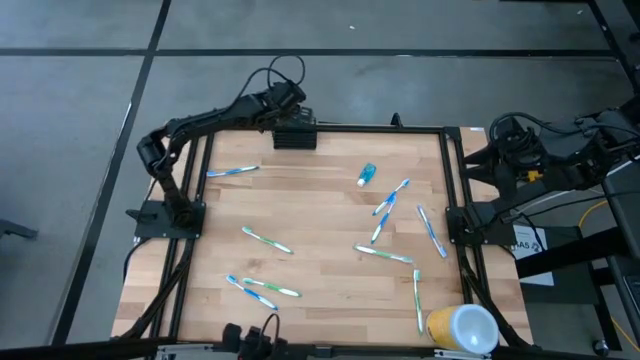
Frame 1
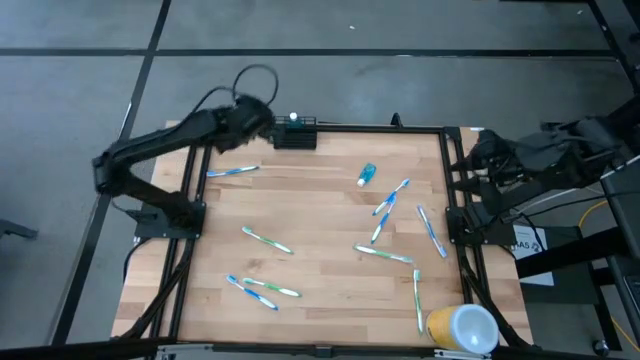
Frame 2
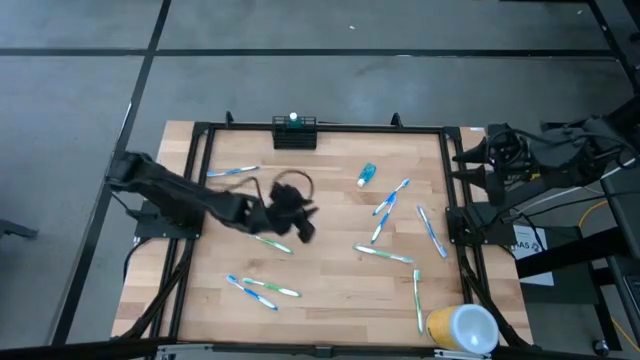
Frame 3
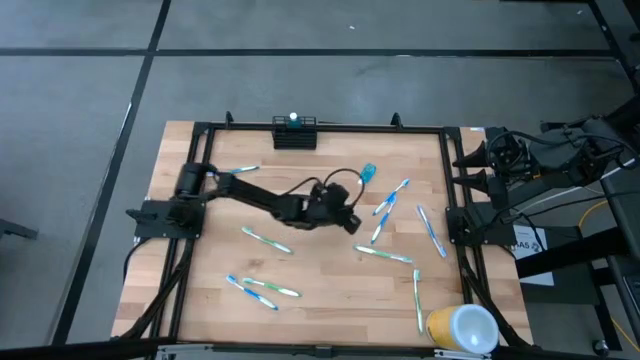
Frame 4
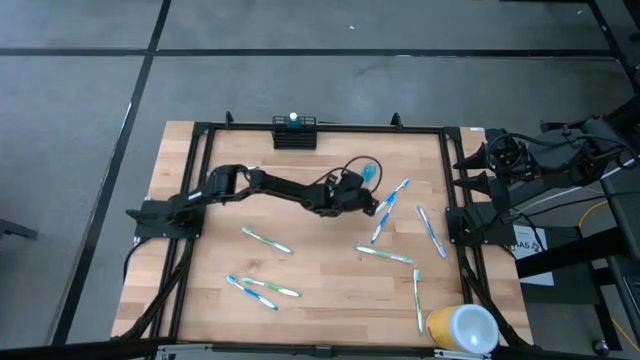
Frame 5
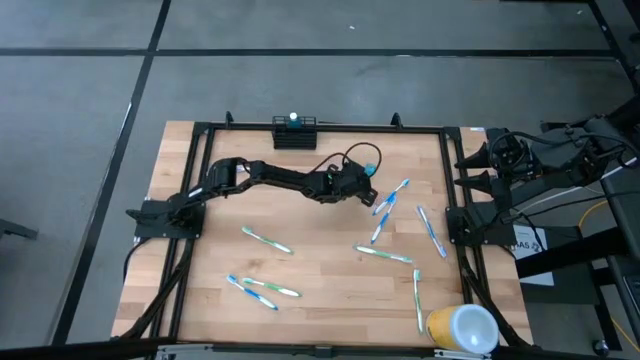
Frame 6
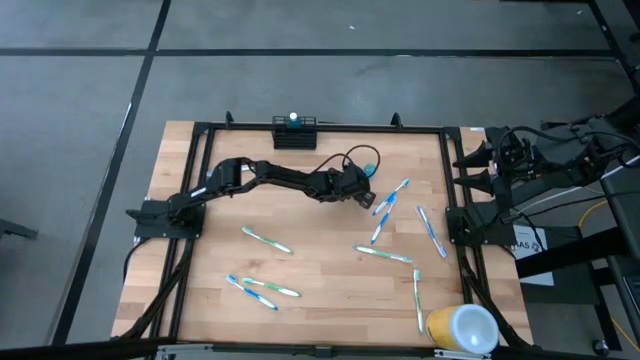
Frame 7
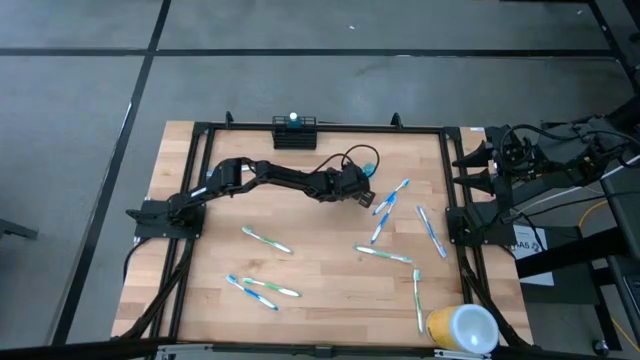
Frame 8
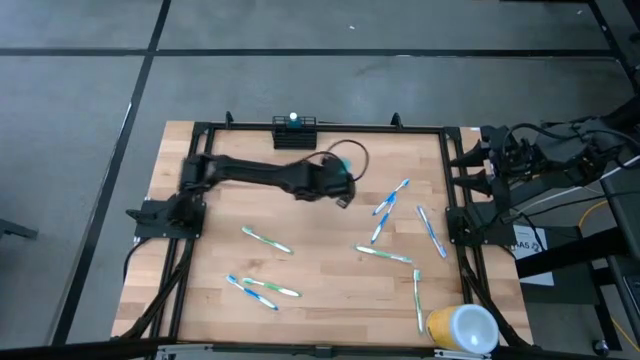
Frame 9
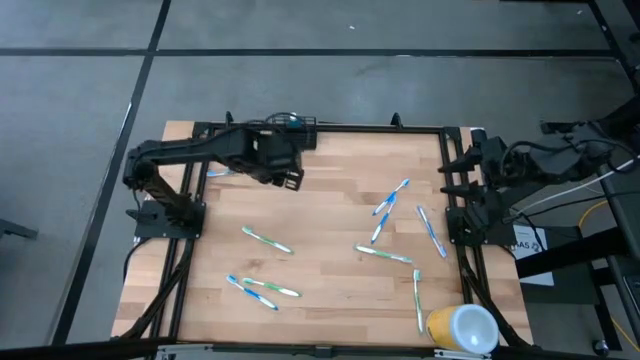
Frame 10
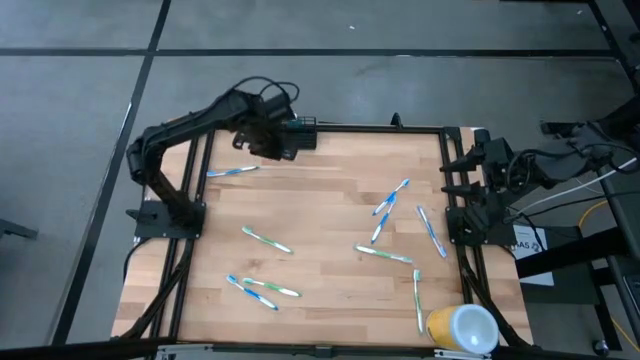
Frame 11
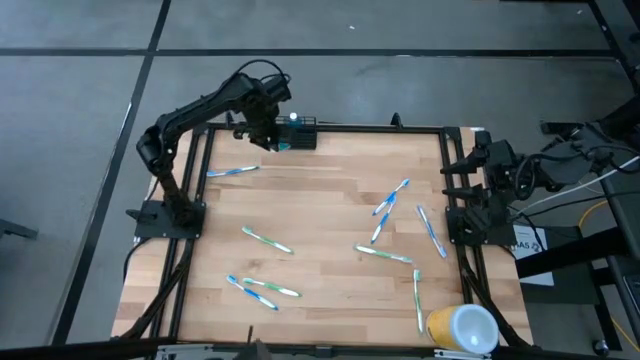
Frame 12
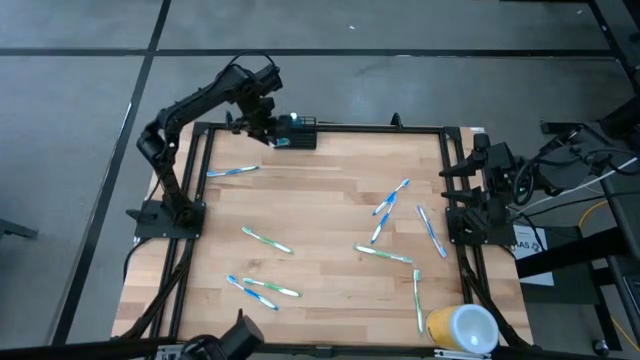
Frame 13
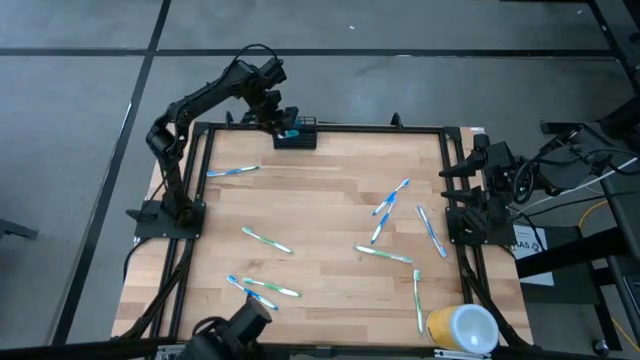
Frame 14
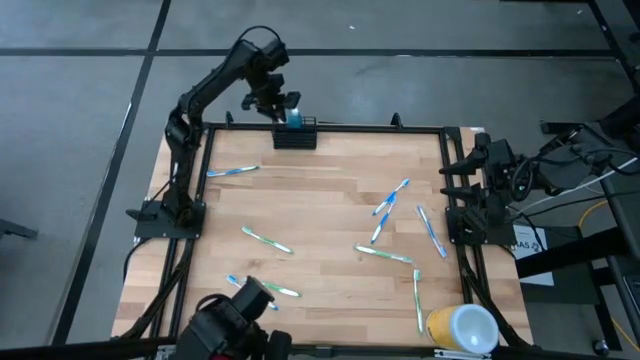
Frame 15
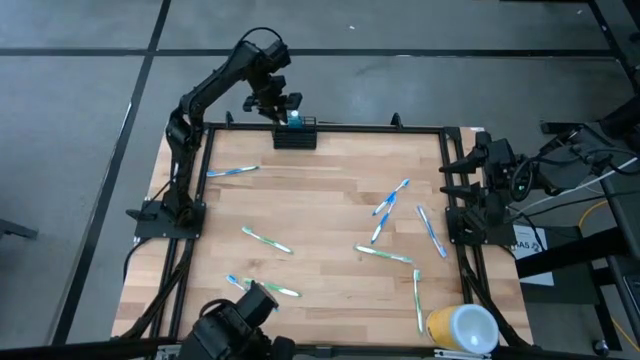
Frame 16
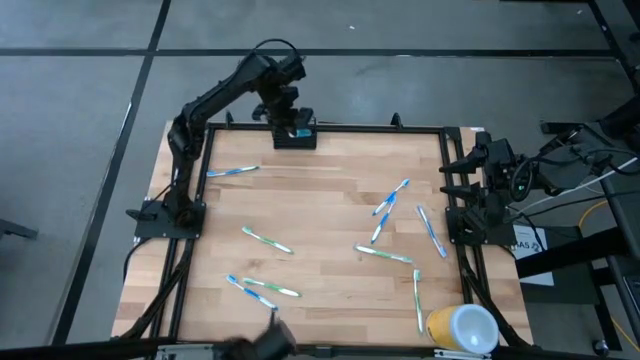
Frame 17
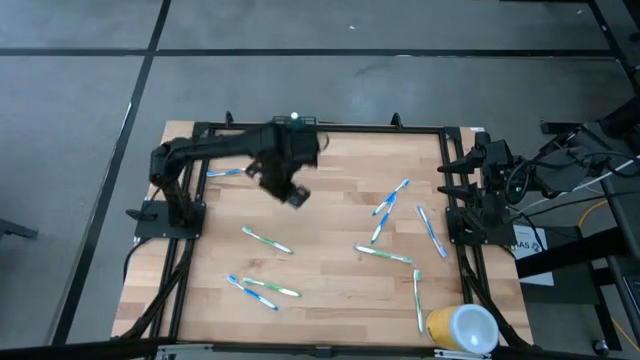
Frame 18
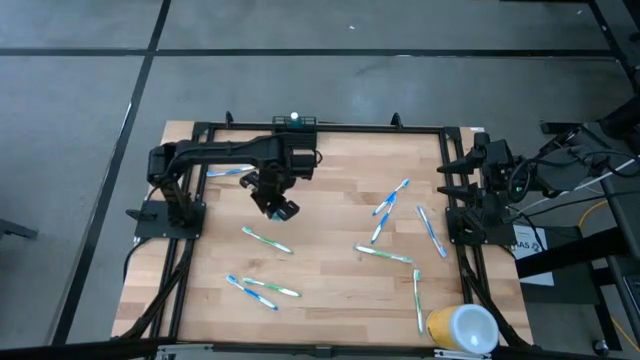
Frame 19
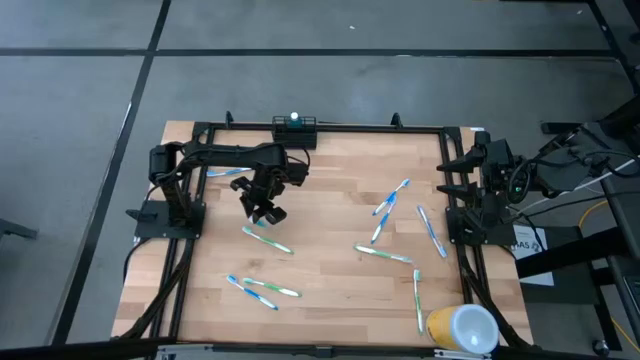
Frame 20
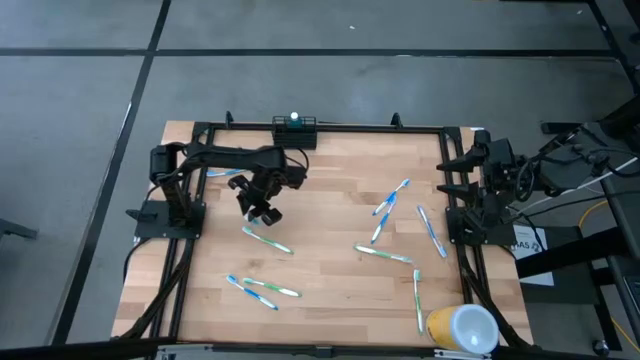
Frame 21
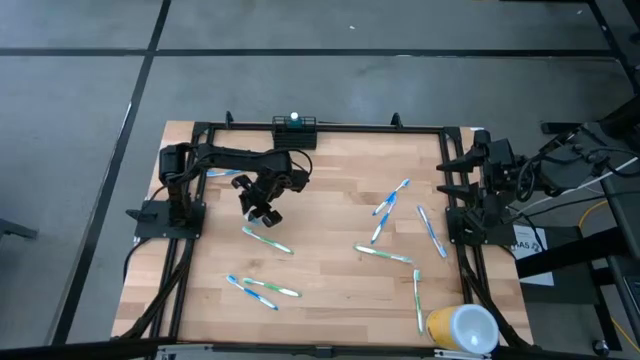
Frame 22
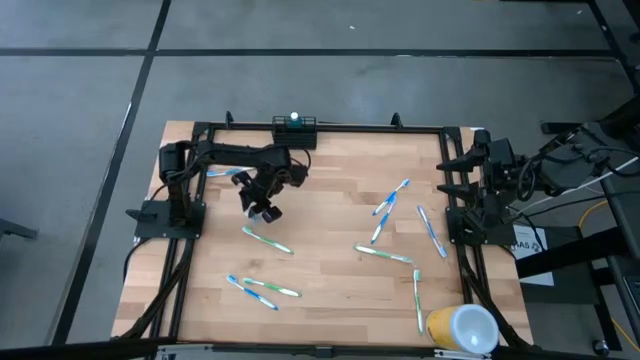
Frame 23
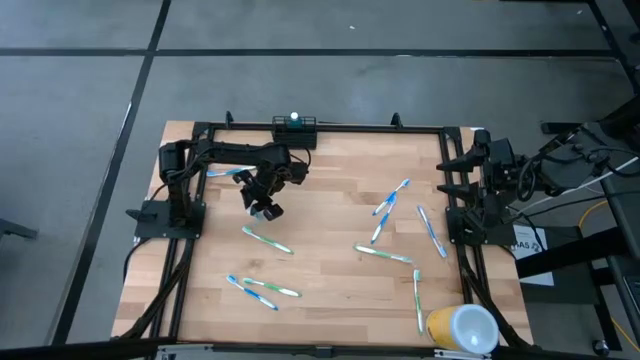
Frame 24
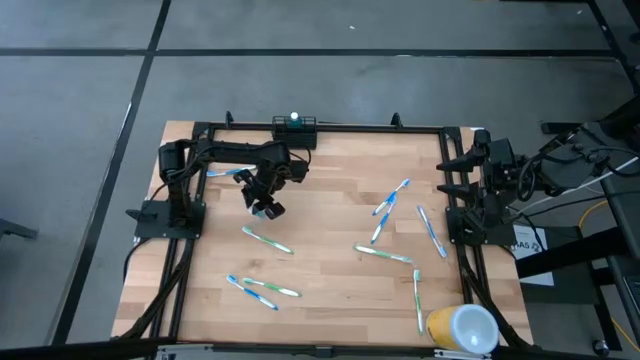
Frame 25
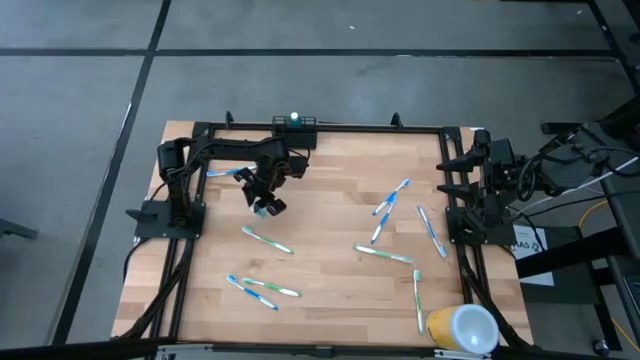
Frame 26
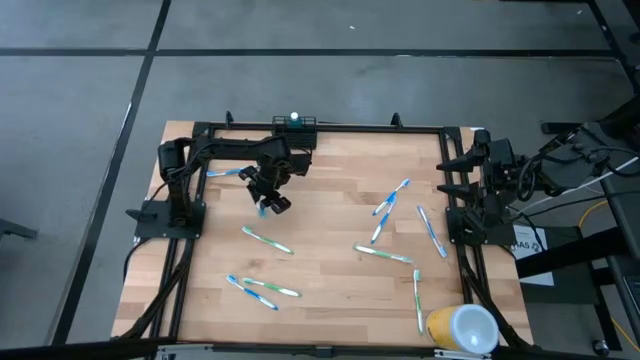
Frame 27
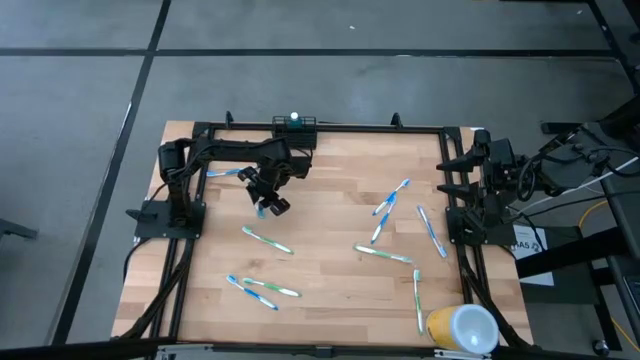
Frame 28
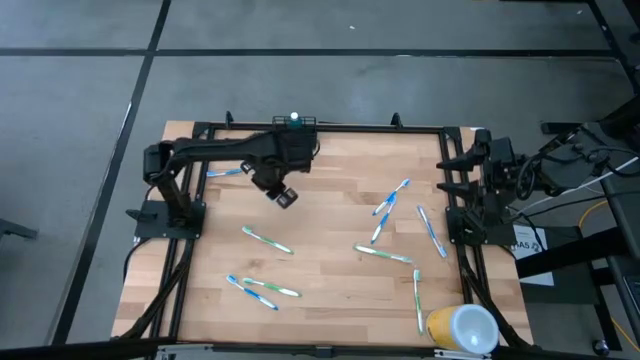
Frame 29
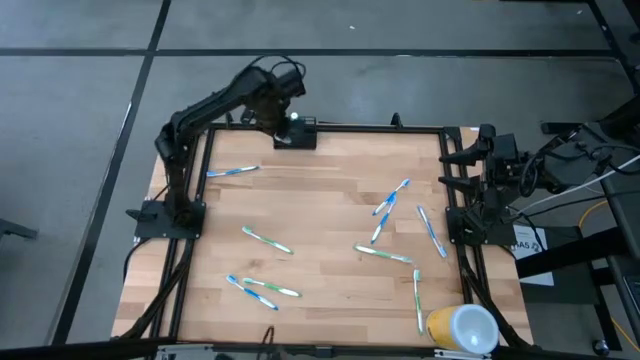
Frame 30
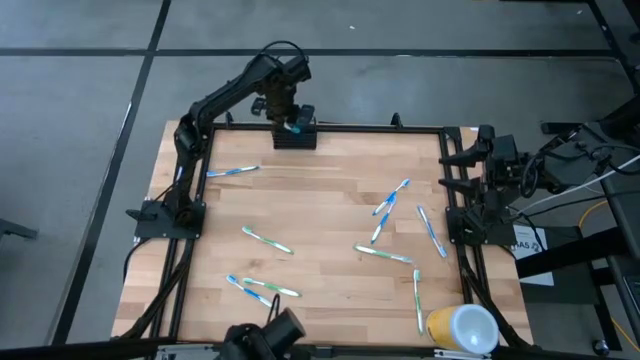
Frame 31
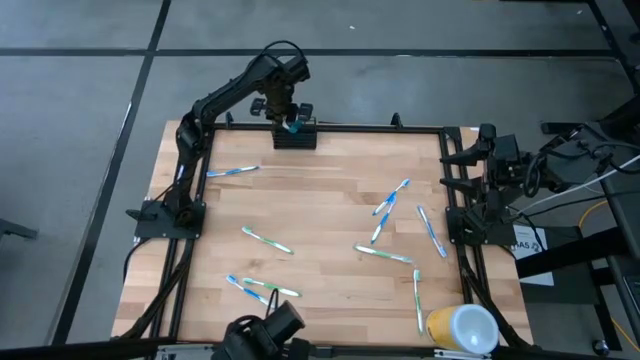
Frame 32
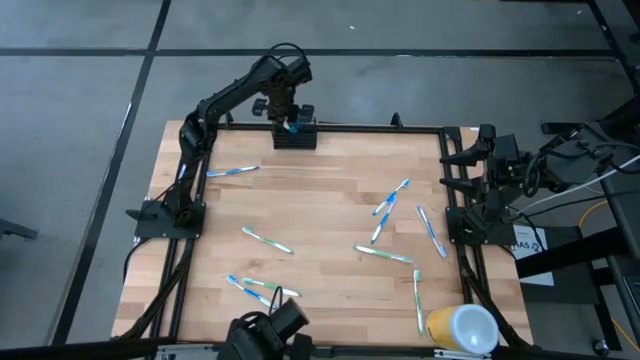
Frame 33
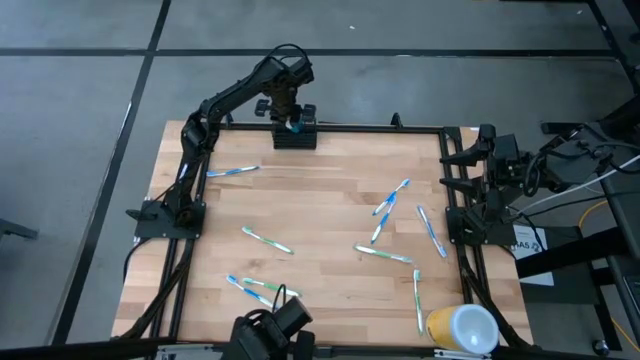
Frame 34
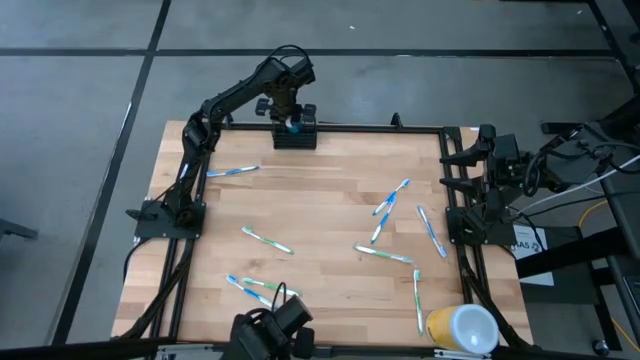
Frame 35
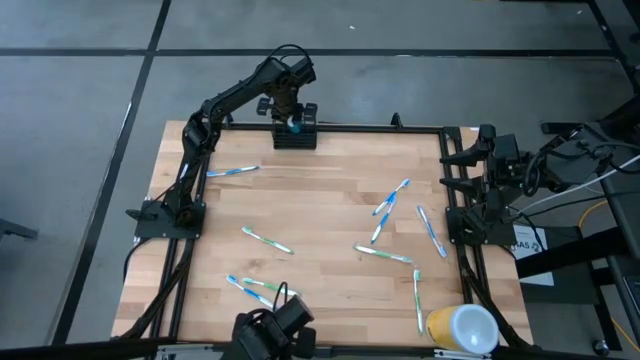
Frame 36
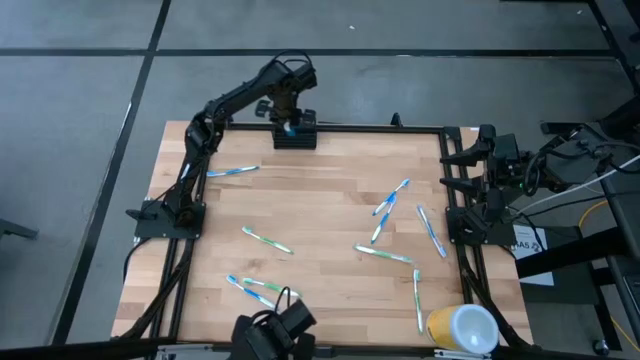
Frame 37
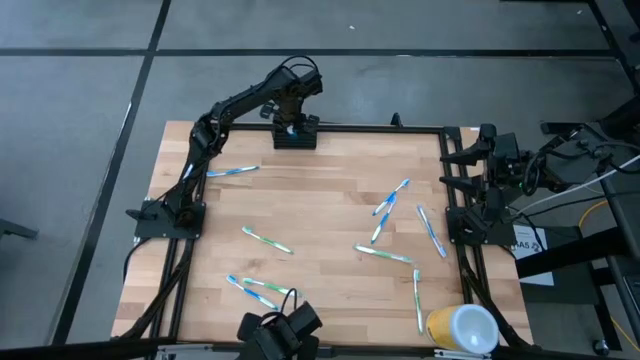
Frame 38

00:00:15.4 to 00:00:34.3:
Task: Pick & Place toothbrushing station
Put the blue mouthwash bottle into the black wire organizer

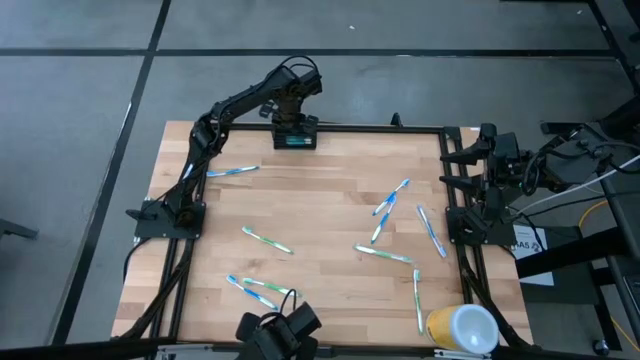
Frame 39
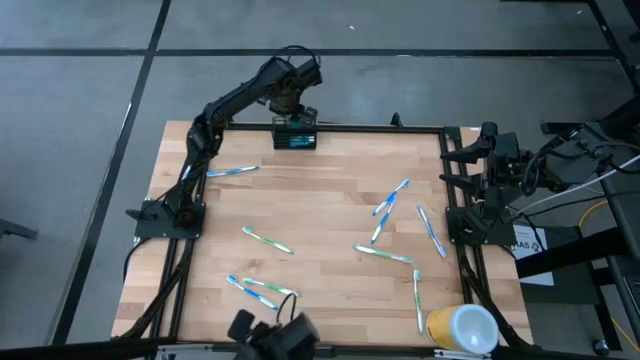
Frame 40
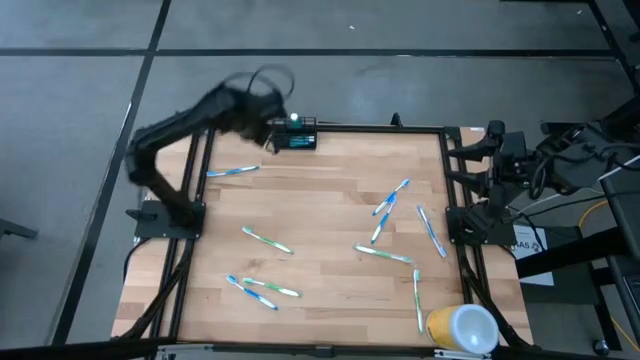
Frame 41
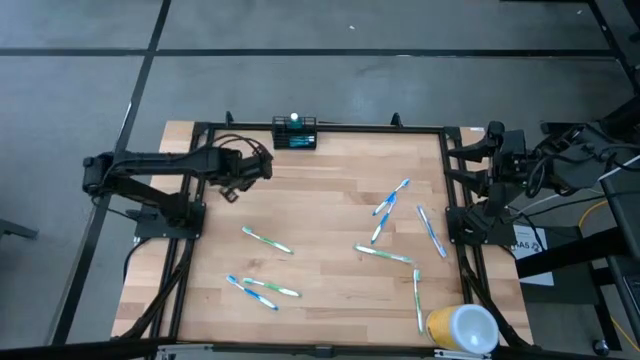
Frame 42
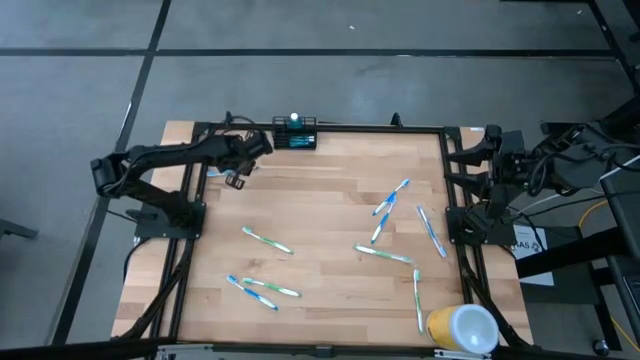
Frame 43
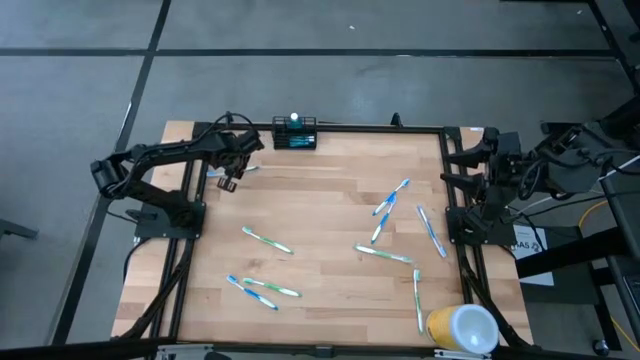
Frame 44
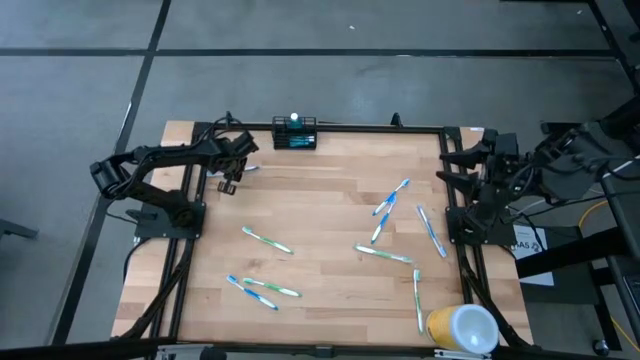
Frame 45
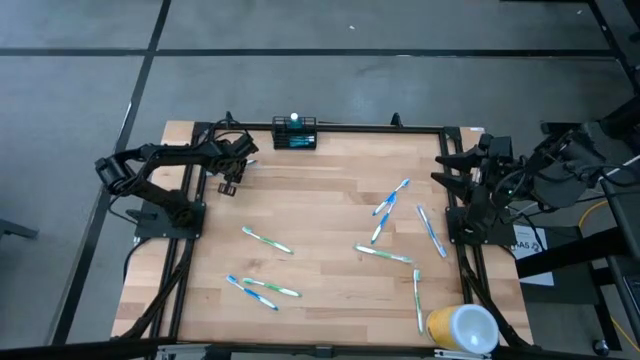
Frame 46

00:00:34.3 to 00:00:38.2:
Put the blue toothbrush into the black wire organizer
